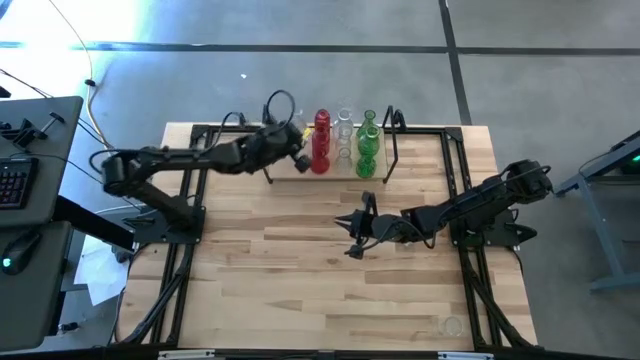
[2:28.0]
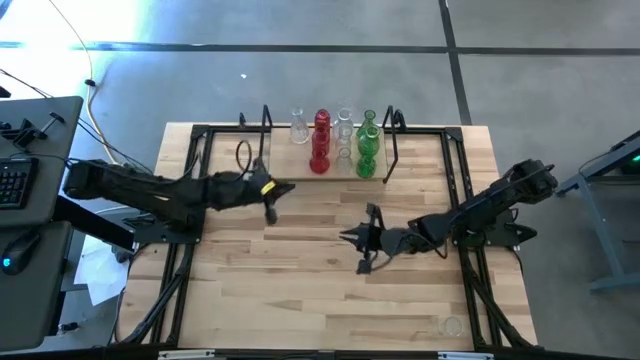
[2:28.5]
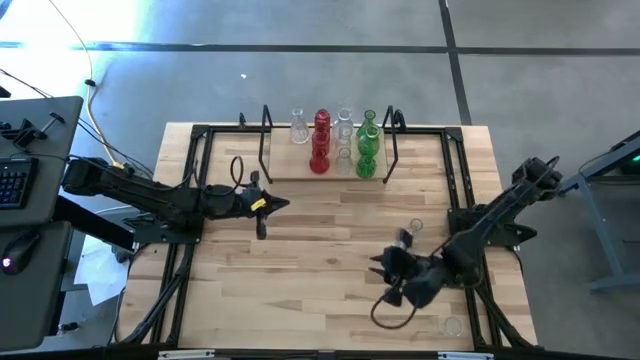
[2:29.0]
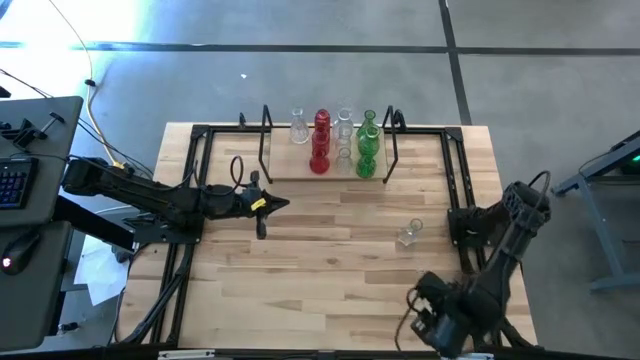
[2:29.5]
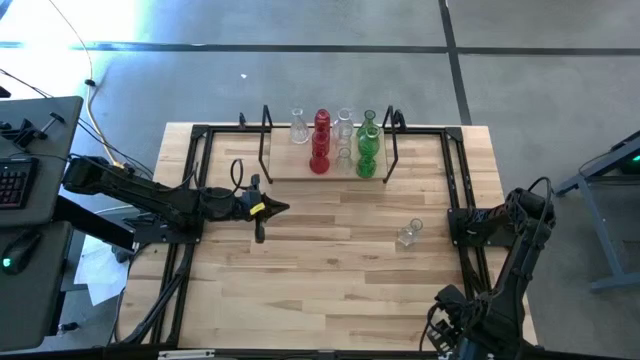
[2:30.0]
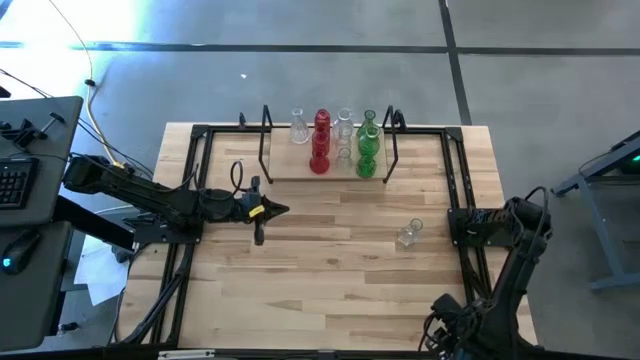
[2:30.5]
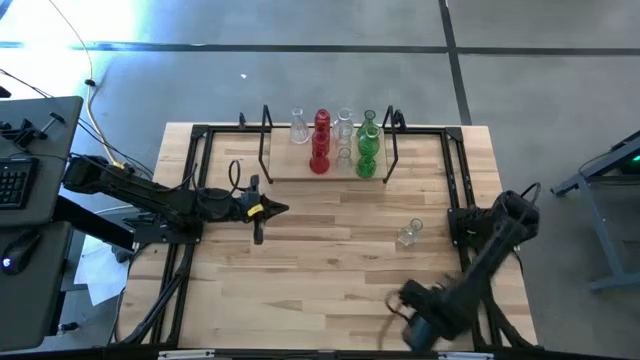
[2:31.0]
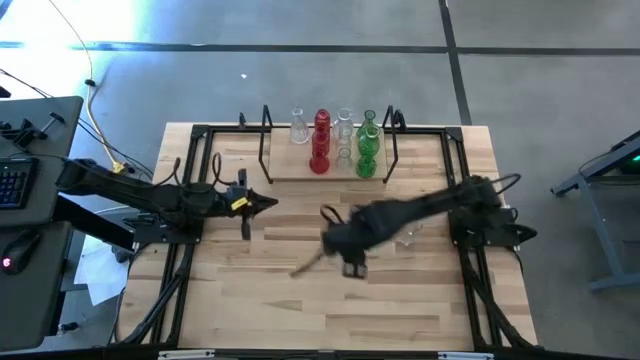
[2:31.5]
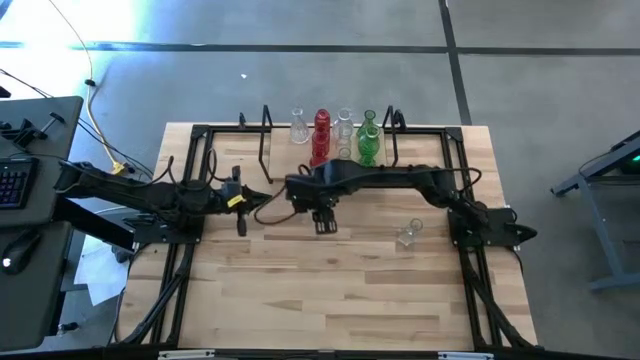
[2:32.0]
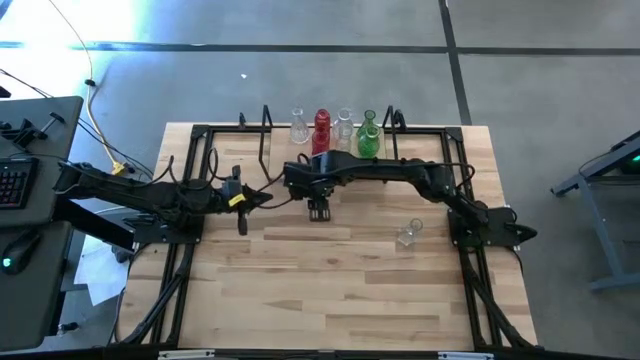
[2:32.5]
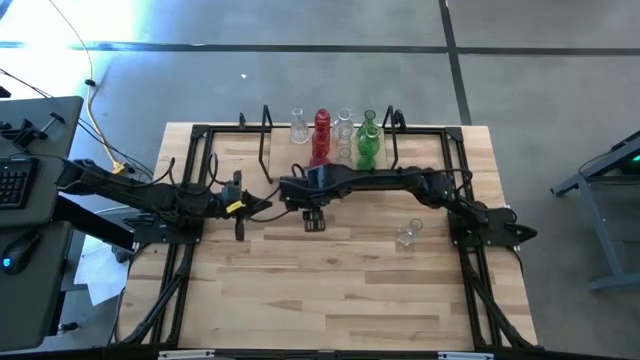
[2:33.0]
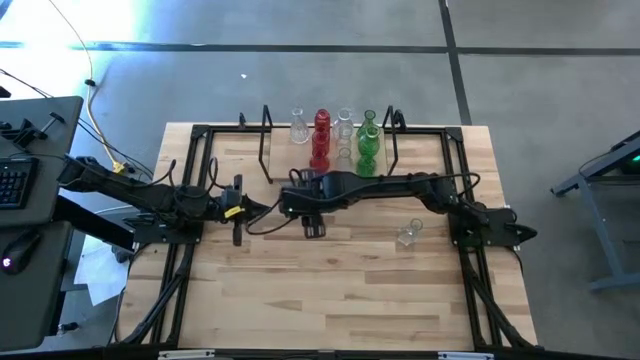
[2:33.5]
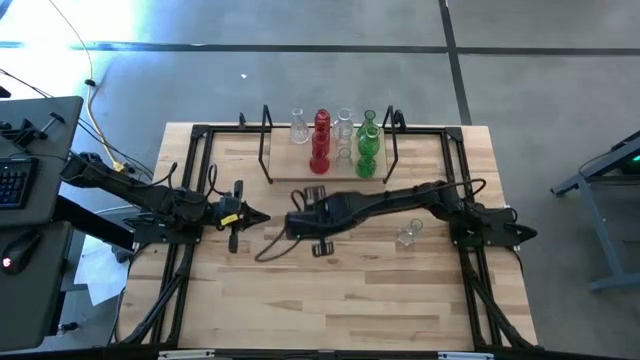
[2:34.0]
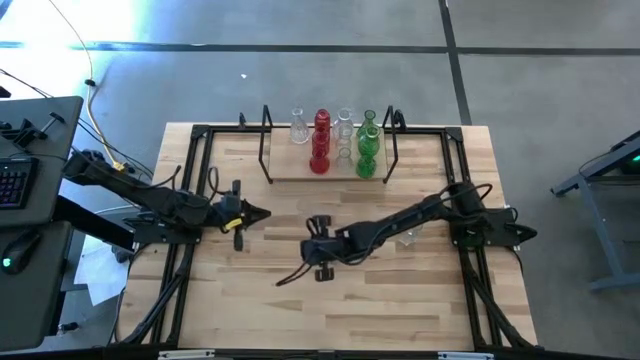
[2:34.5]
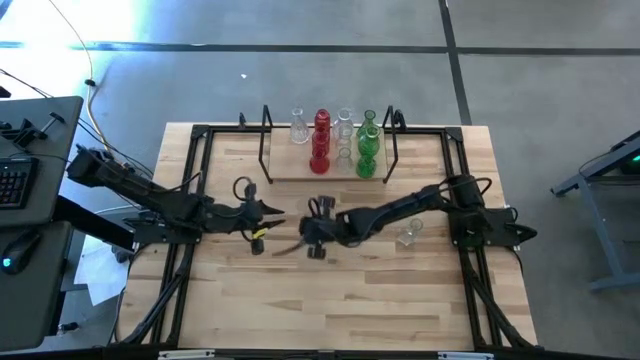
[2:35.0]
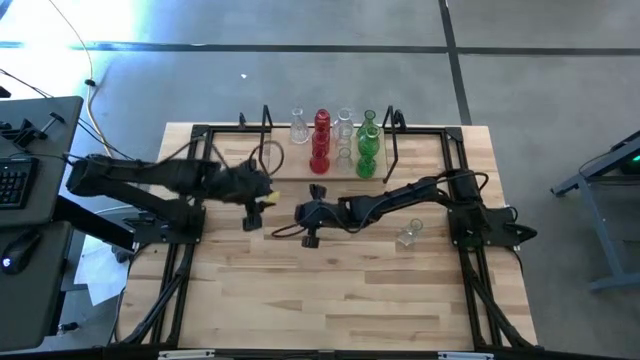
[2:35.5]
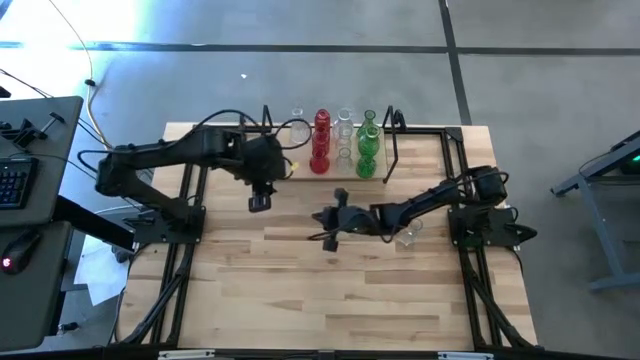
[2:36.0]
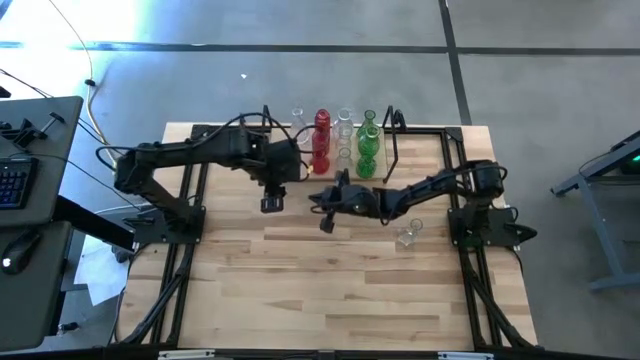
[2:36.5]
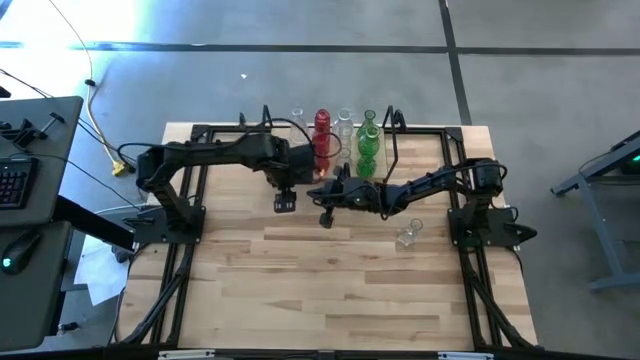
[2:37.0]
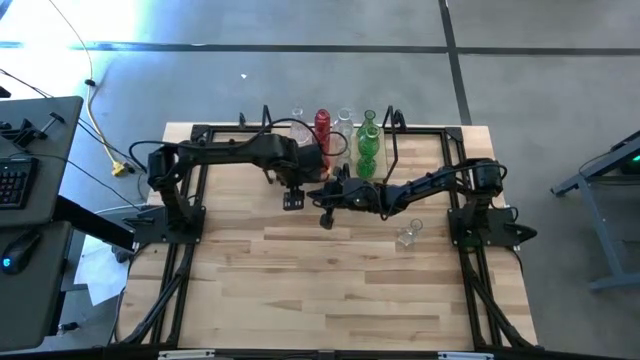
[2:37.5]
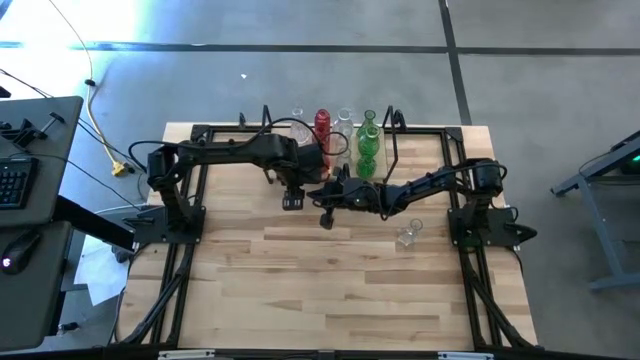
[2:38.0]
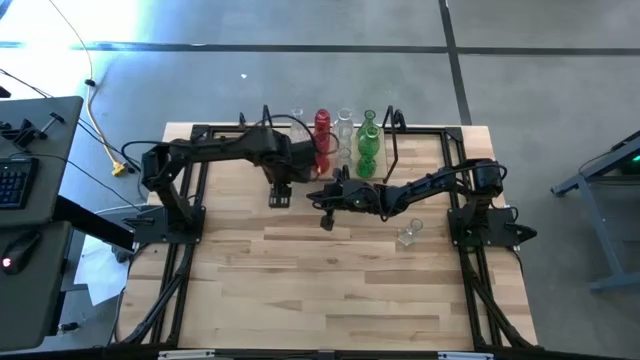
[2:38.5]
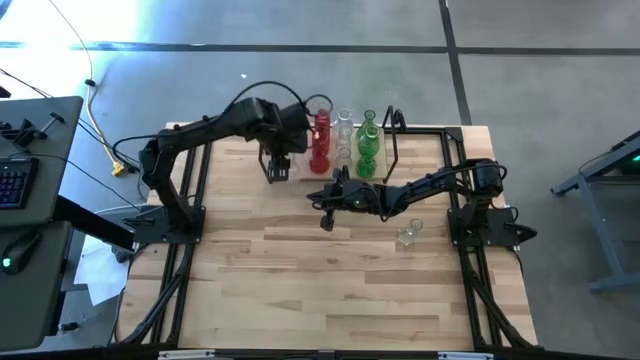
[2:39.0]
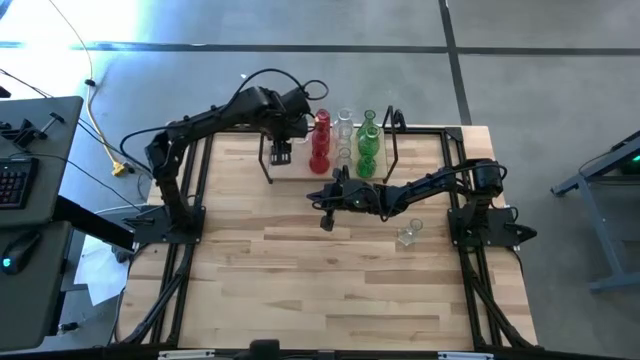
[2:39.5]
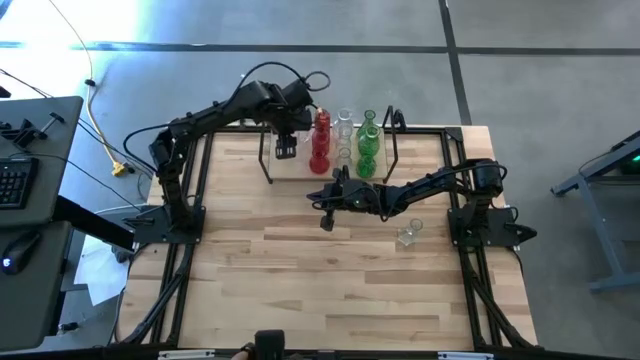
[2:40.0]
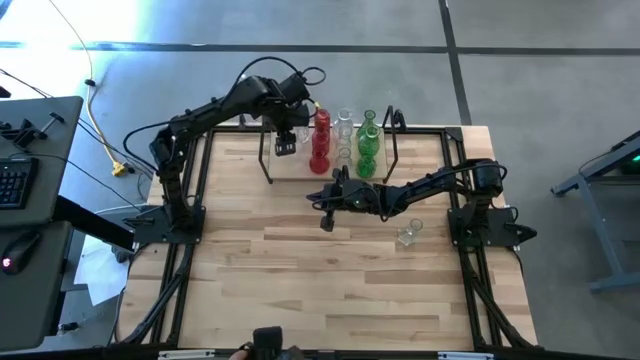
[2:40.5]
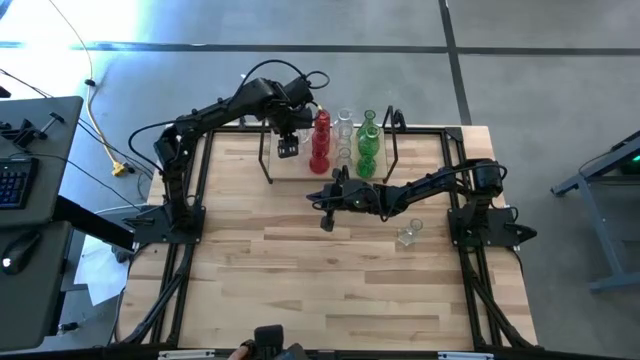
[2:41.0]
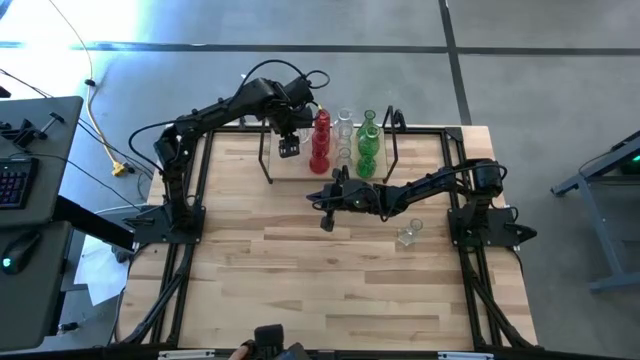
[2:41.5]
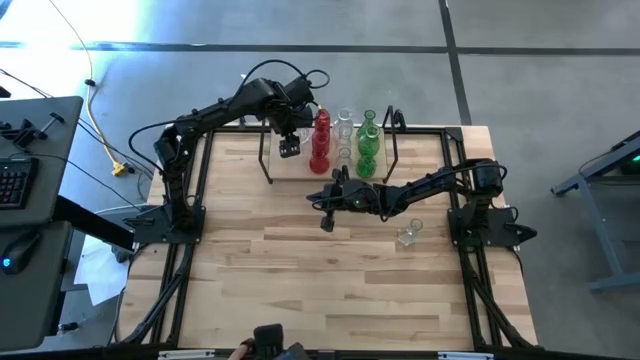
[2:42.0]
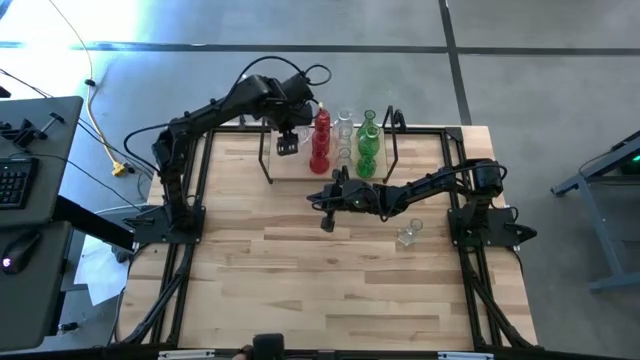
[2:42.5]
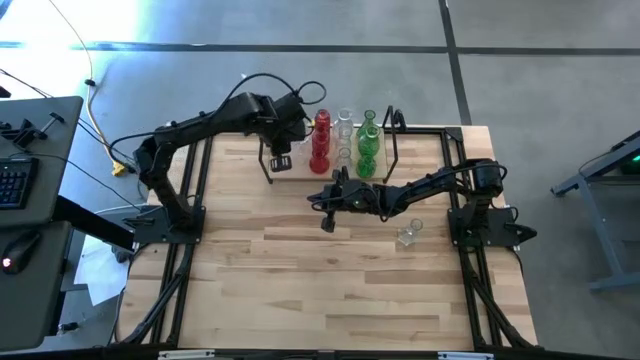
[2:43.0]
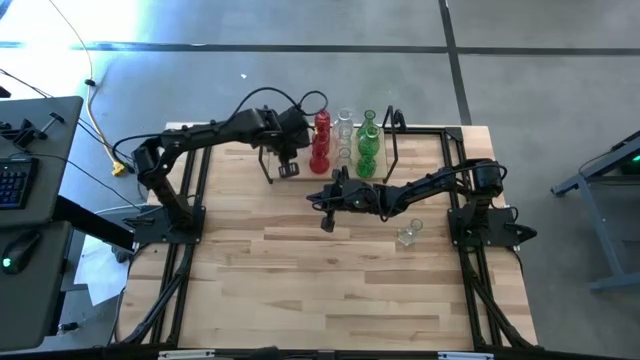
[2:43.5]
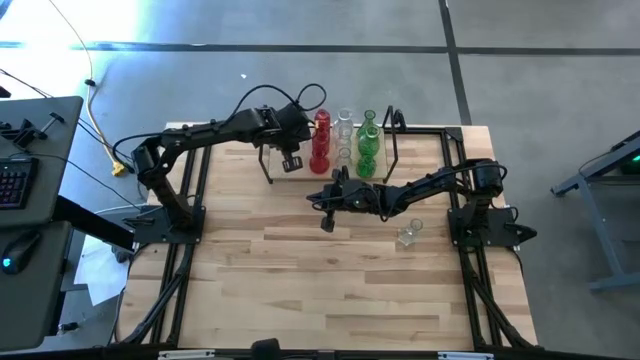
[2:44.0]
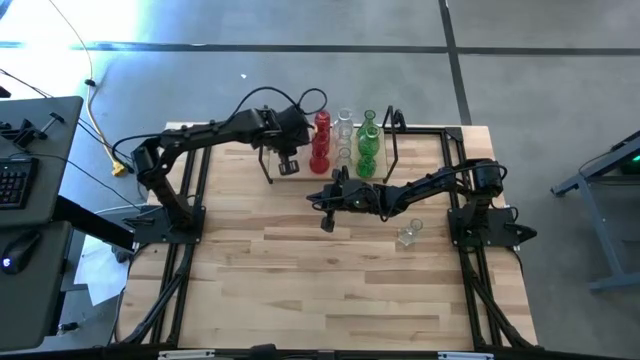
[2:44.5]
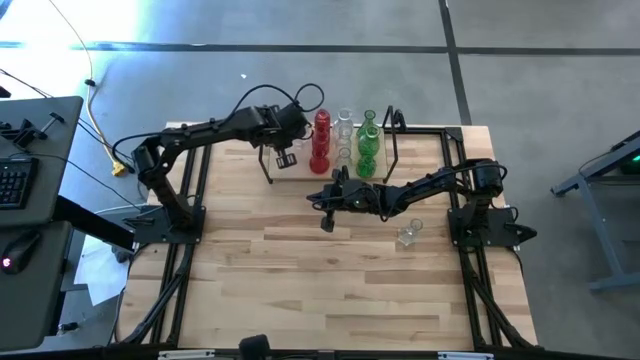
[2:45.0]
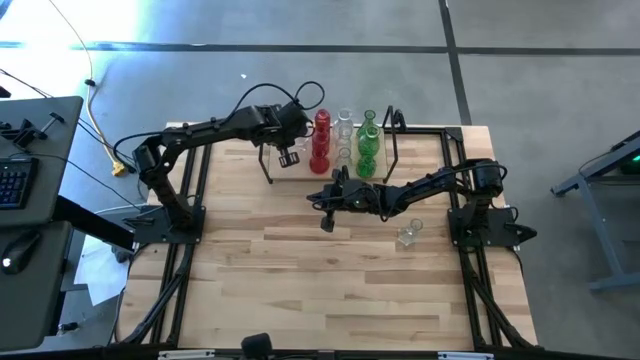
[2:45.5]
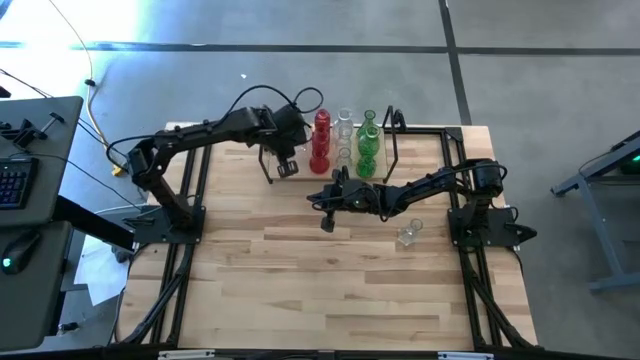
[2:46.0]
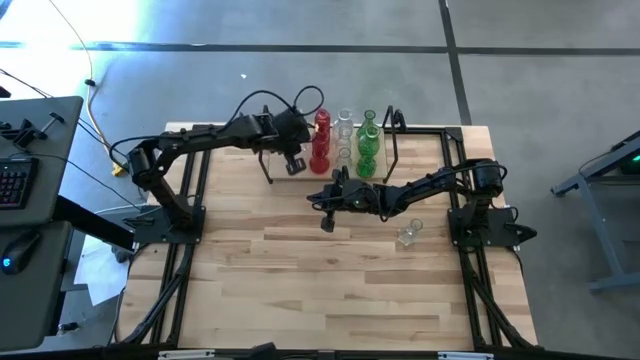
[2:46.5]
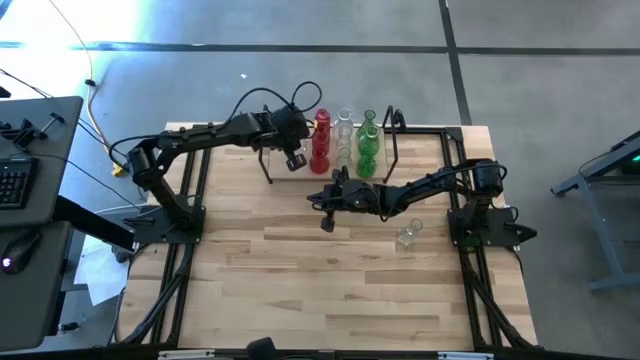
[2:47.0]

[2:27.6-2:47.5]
Task: sort vases onto shelf
Put the bottom transparent vase aligned with the other transparent vase on the shelf
